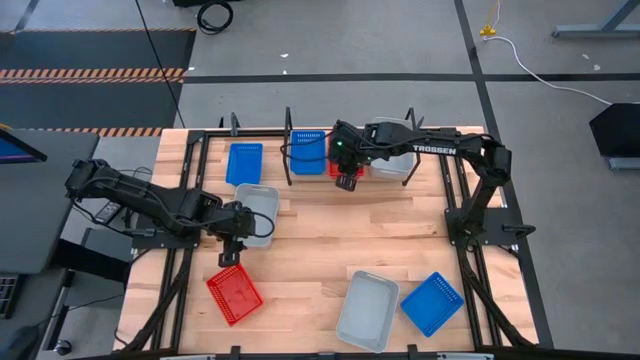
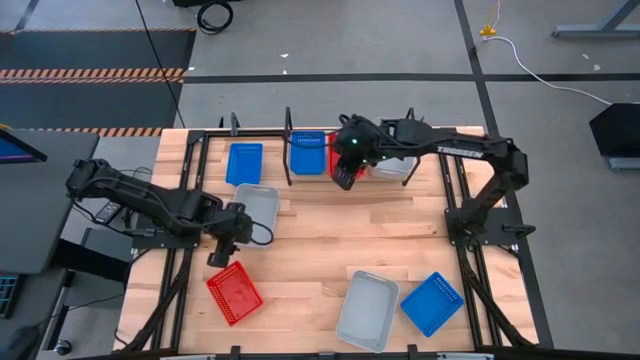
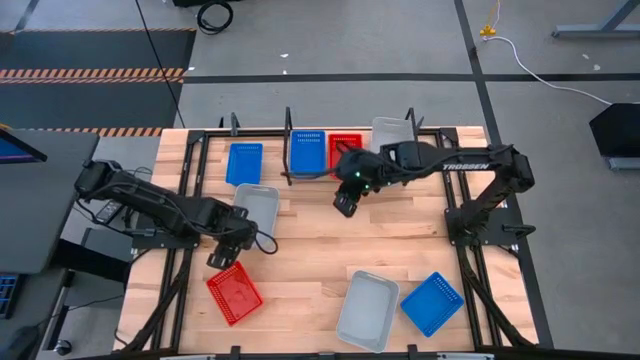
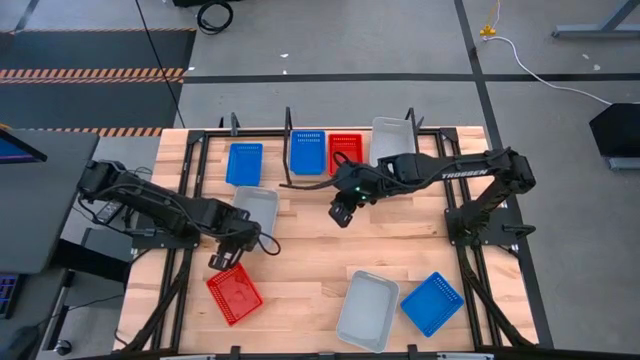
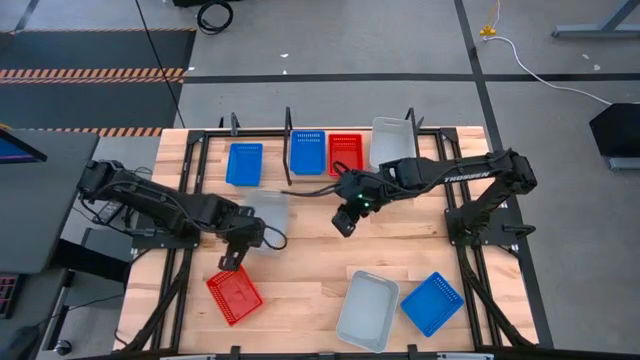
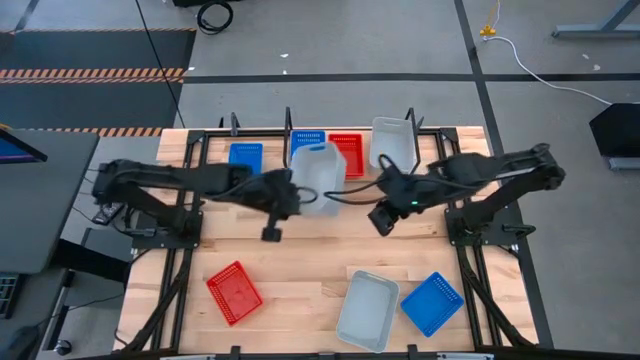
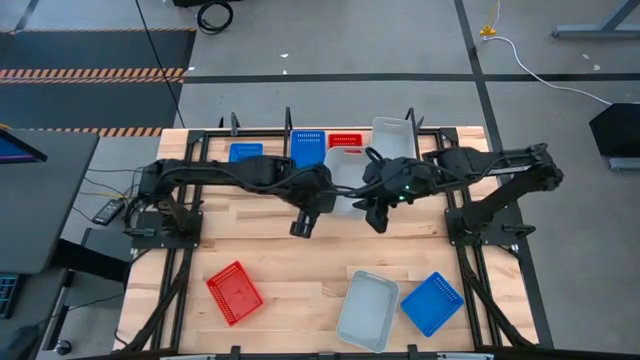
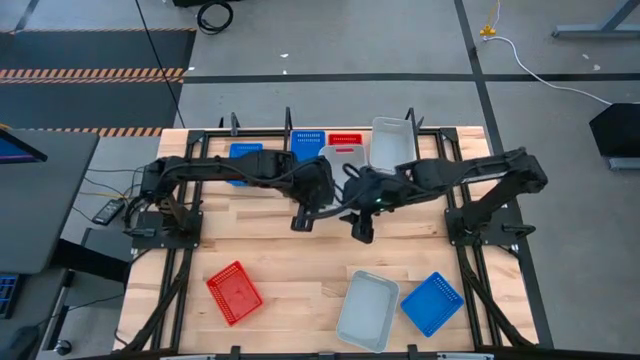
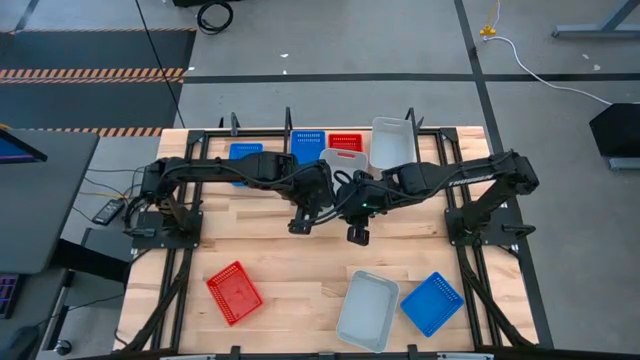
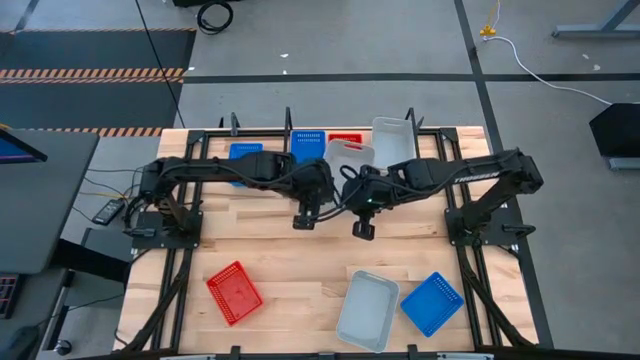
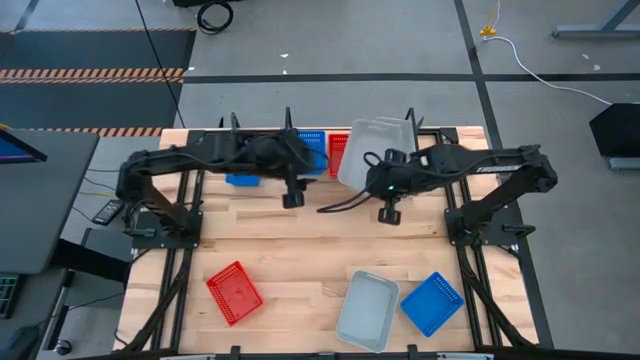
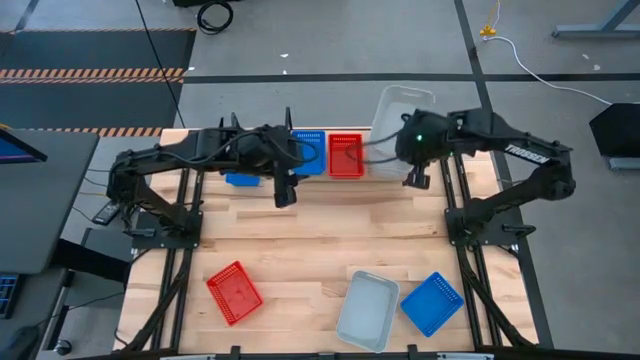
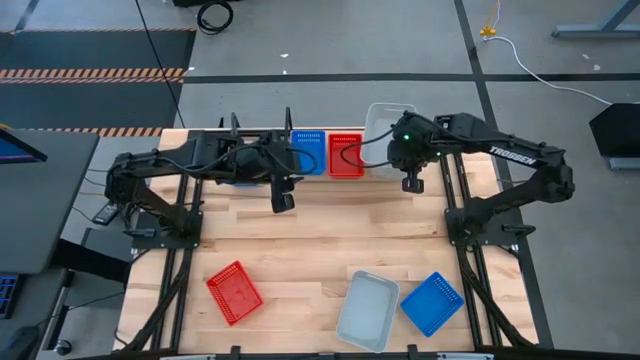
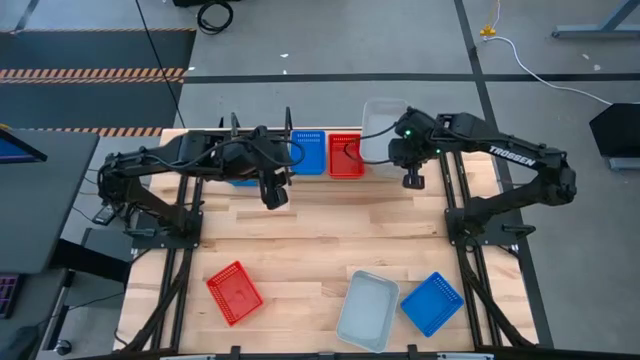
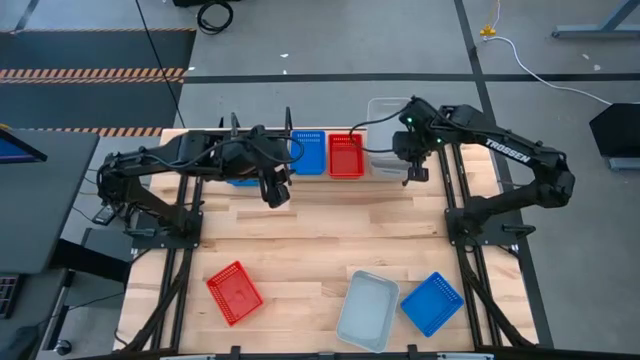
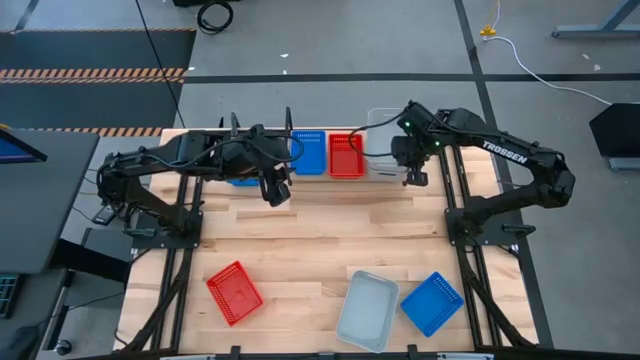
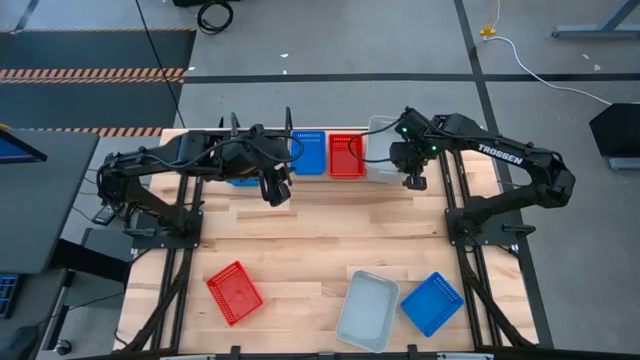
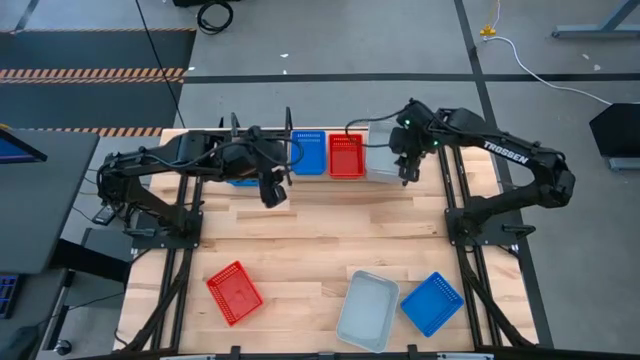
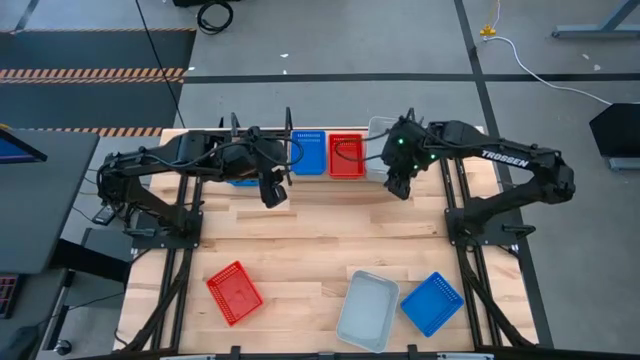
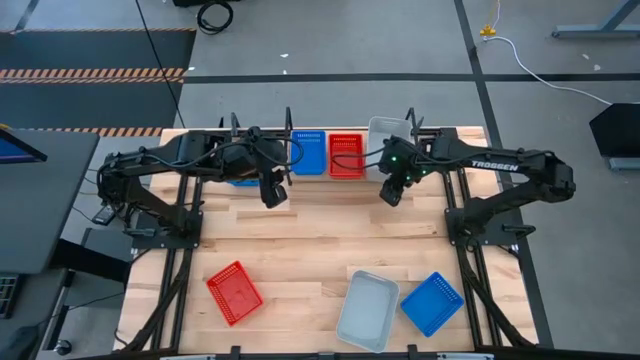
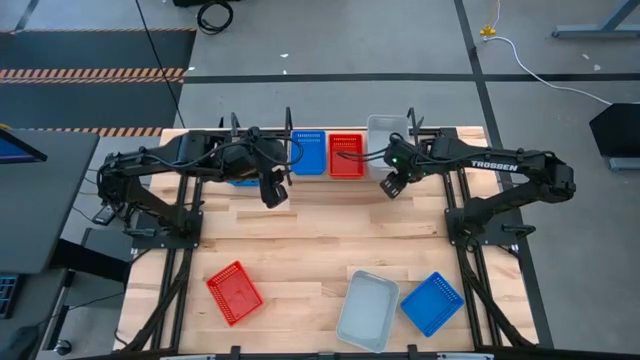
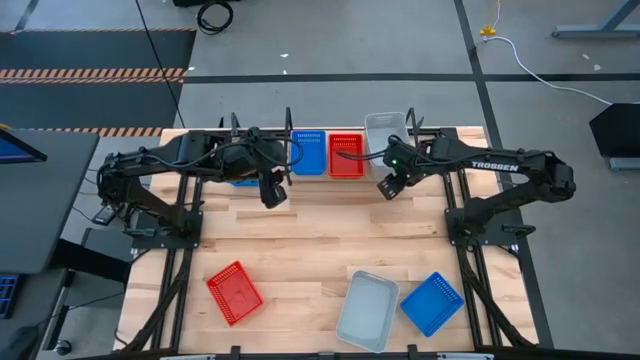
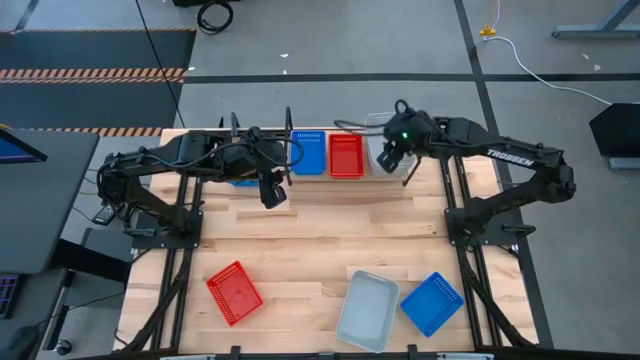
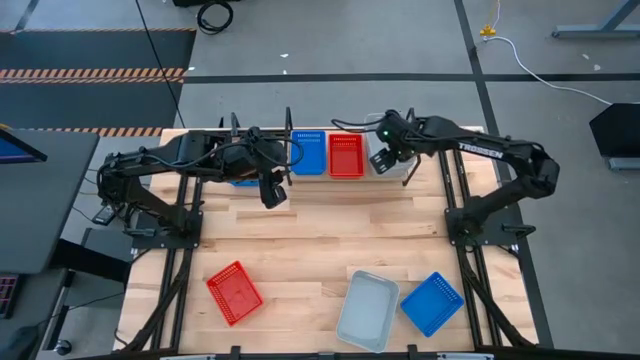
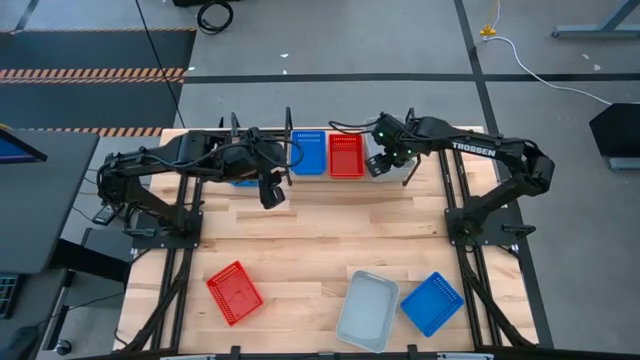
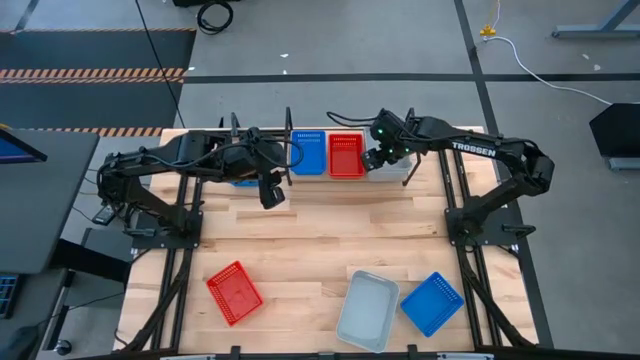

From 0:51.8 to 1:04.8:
Task: Stack baskets on shelf by color
Stack the top gray bin on the gray bin on the shelf

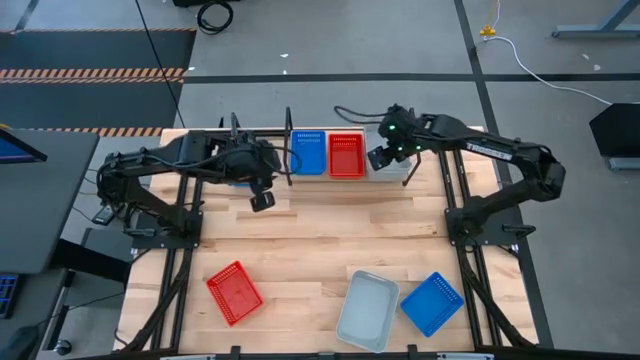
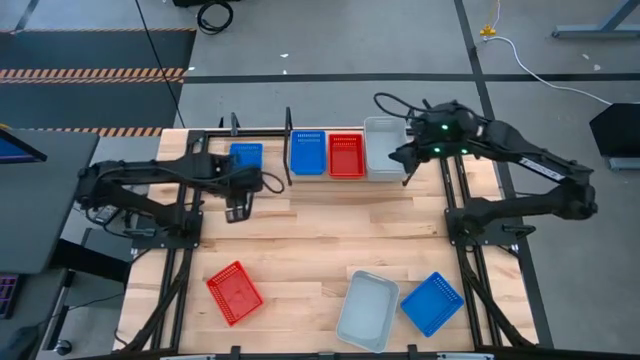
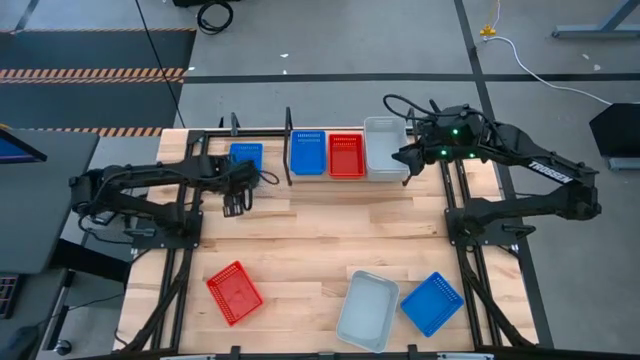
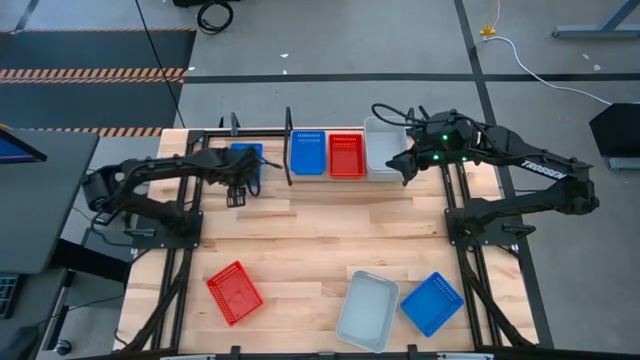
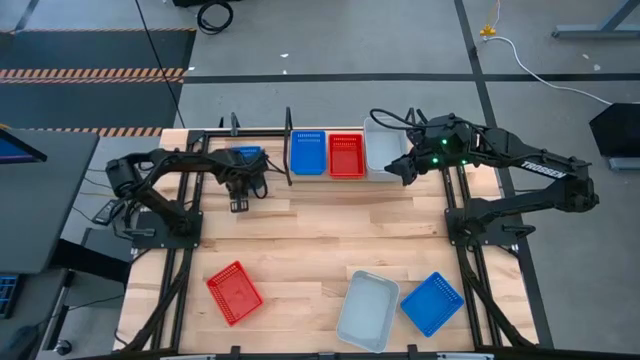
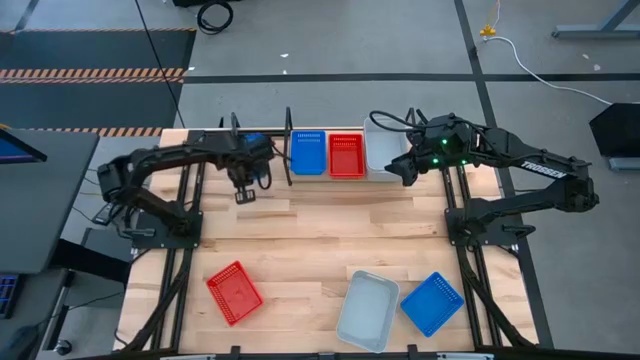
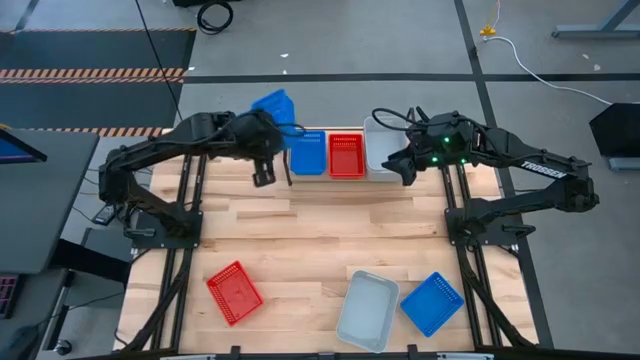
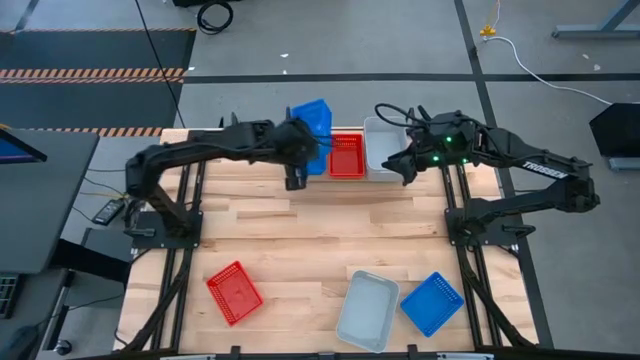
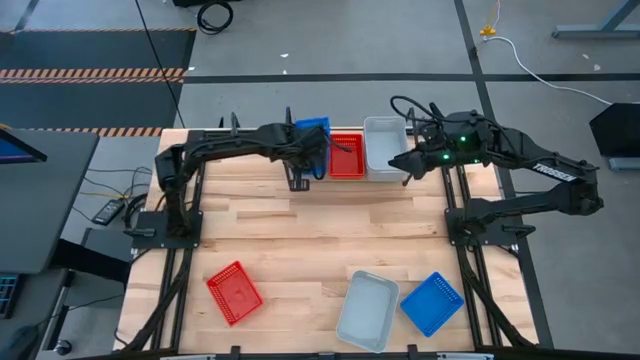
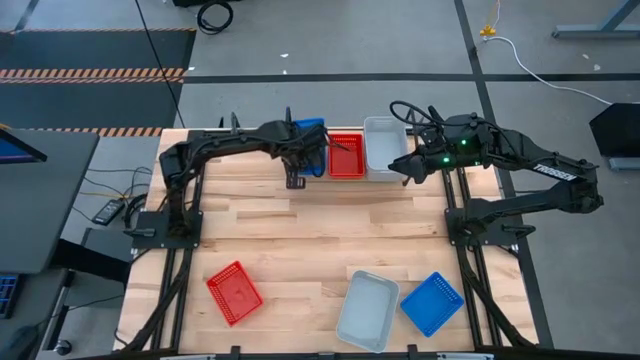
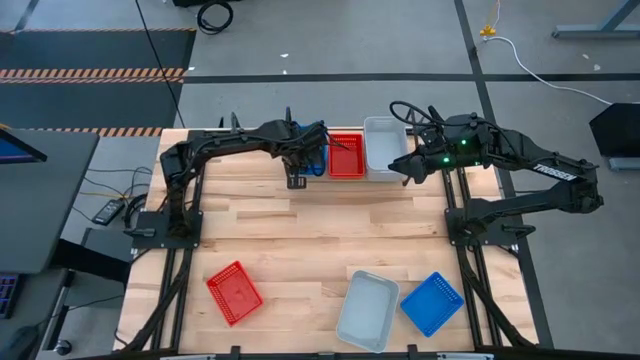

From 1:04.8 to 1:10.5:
Stack the top blue bin on the blue bin on the shelf
